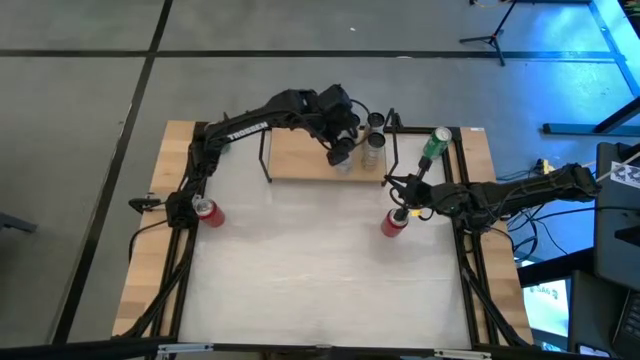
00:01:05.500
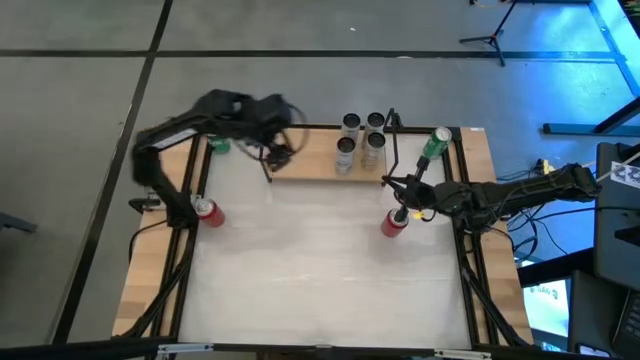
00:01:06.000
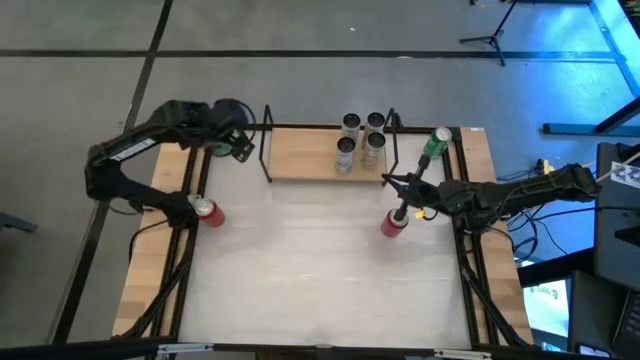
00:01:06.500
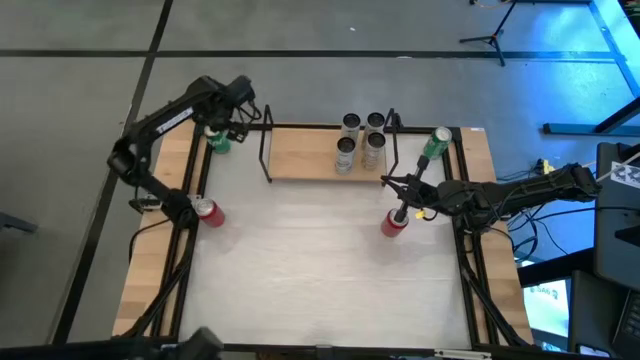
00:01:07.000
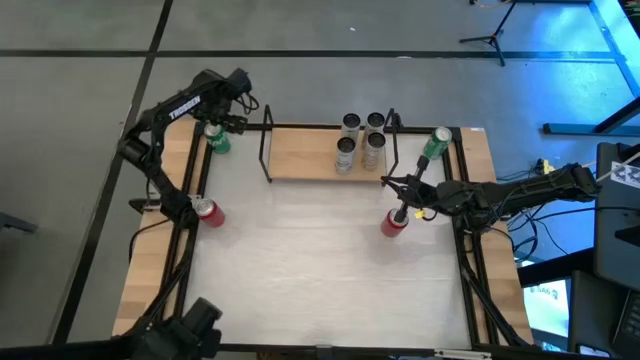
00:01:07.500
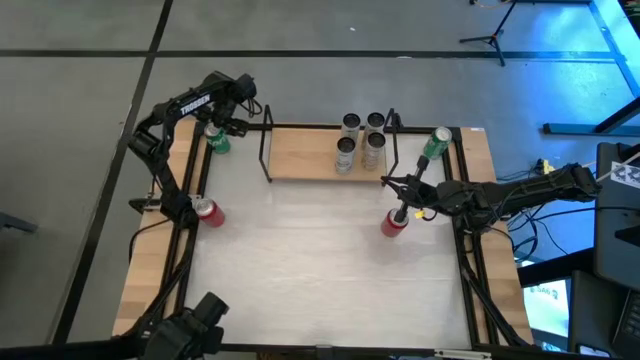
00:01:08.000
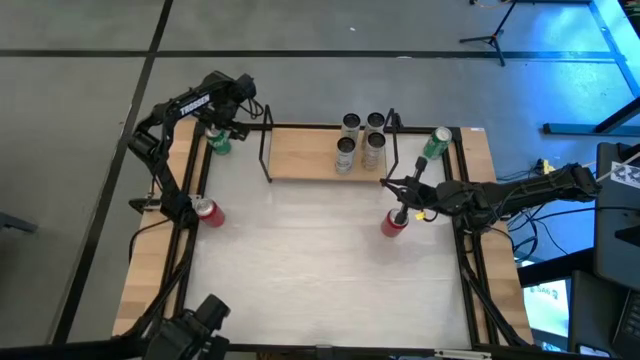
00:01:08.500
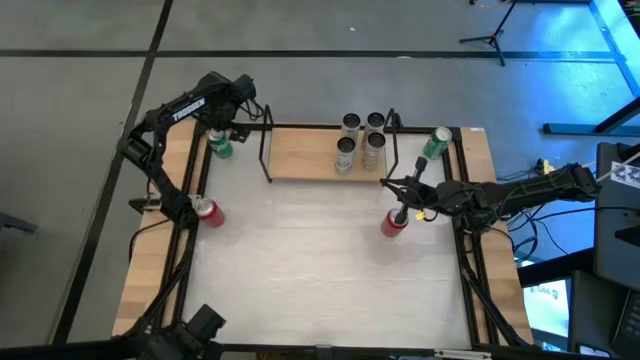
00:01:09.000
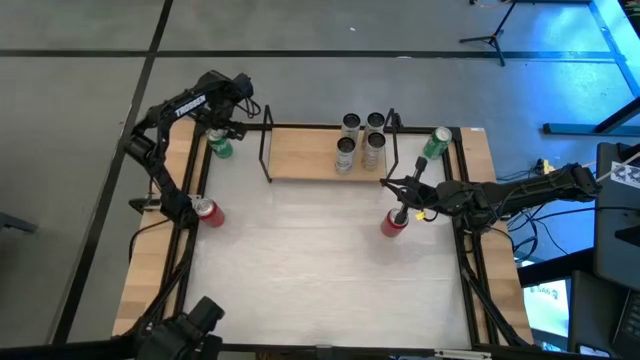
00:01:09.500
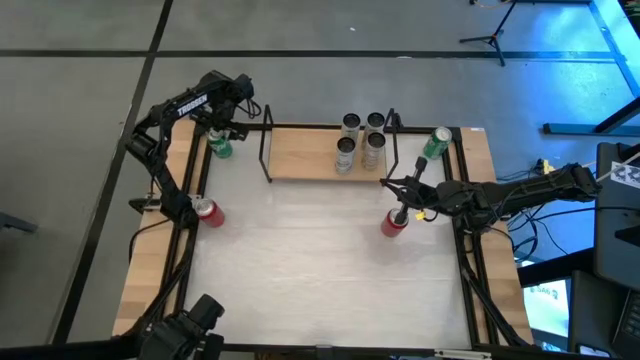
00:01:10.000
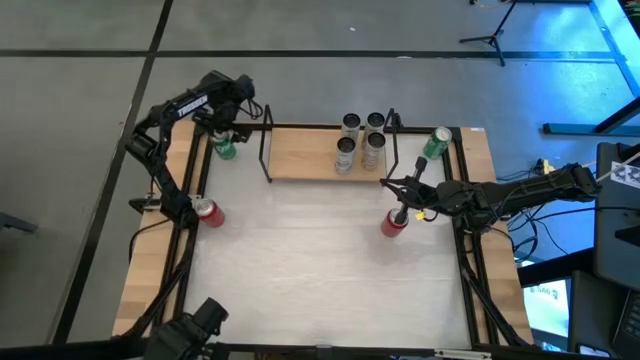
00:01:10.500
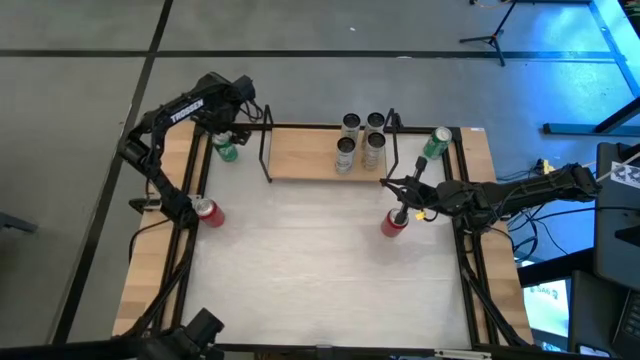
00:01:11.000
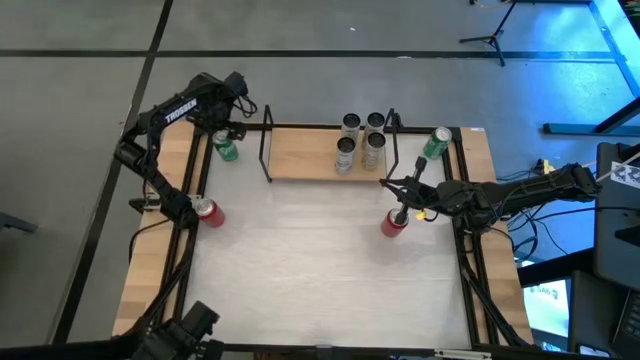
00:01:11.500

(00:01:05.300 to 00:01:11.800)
Task: Place canned beverage on shelf
Put the left green soda can on the shelf

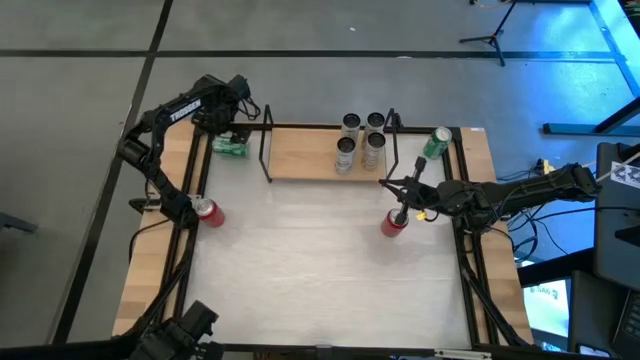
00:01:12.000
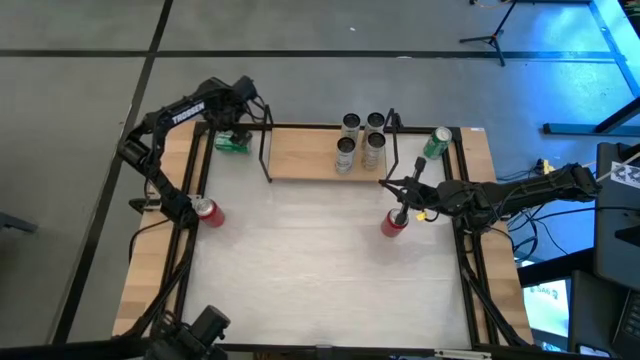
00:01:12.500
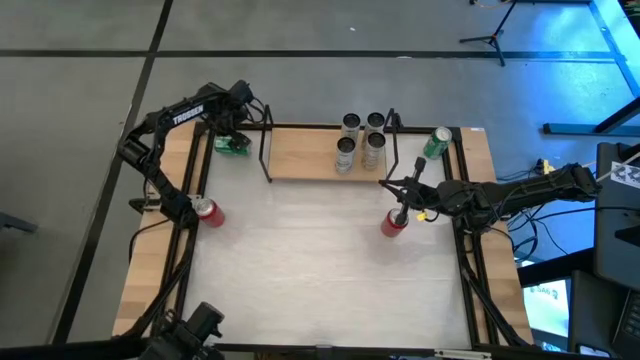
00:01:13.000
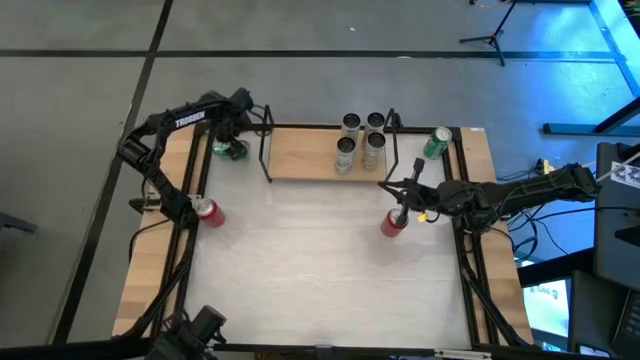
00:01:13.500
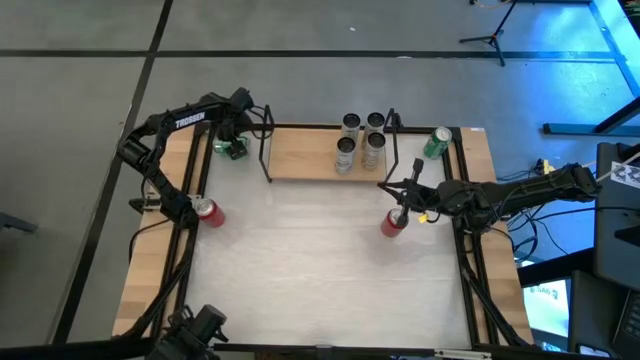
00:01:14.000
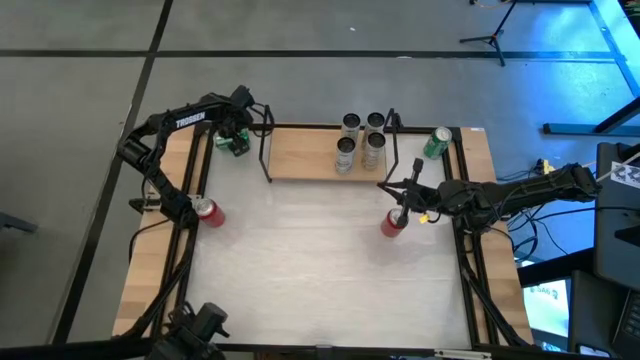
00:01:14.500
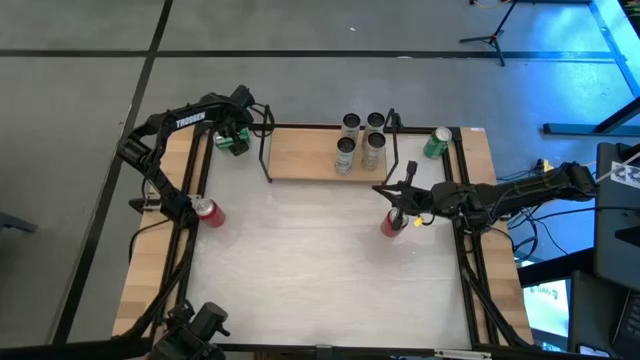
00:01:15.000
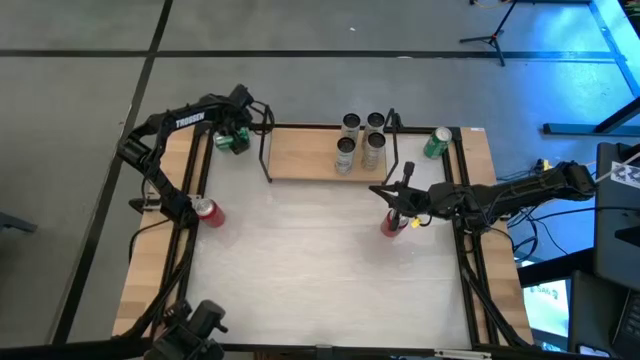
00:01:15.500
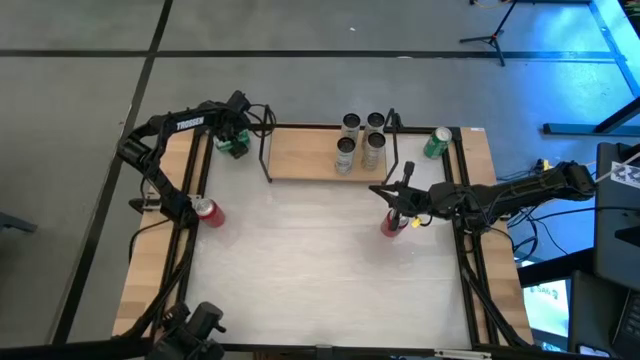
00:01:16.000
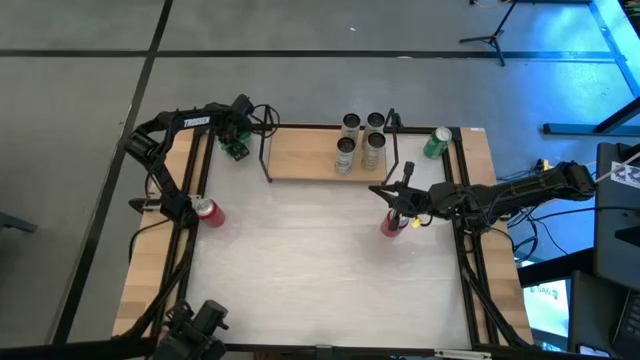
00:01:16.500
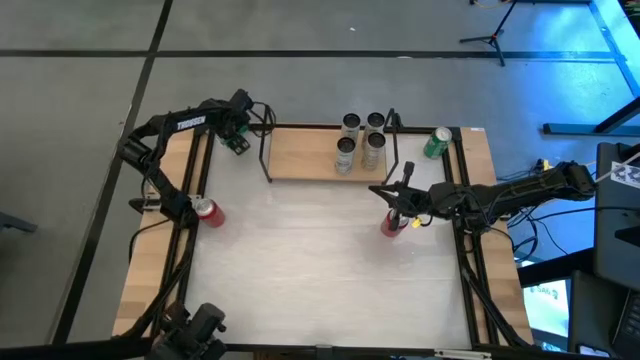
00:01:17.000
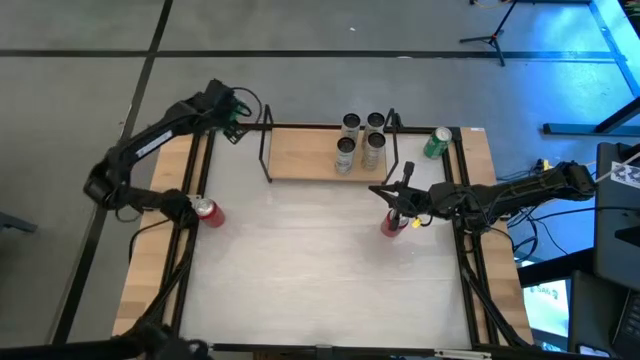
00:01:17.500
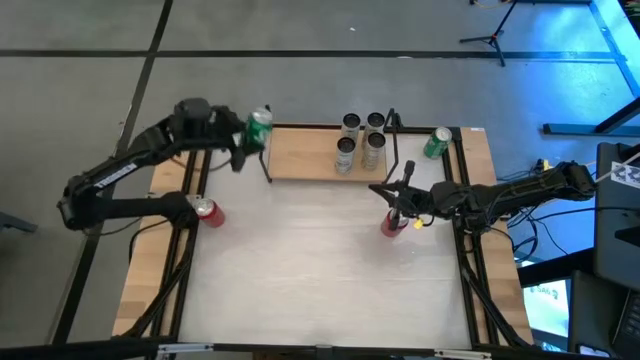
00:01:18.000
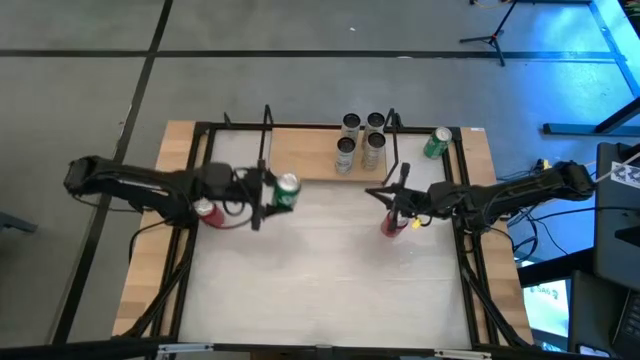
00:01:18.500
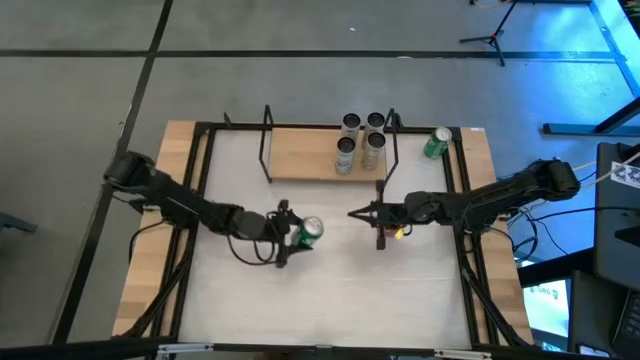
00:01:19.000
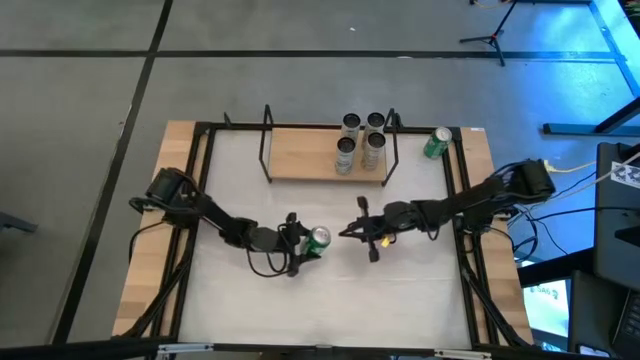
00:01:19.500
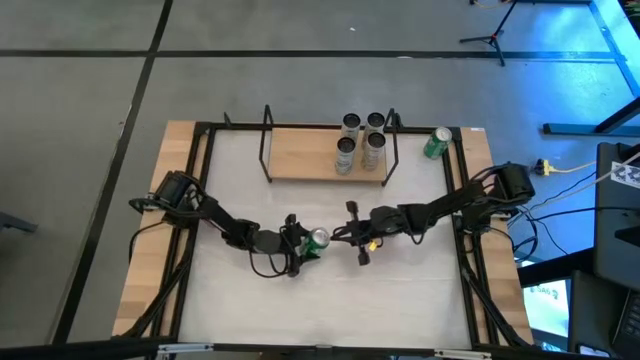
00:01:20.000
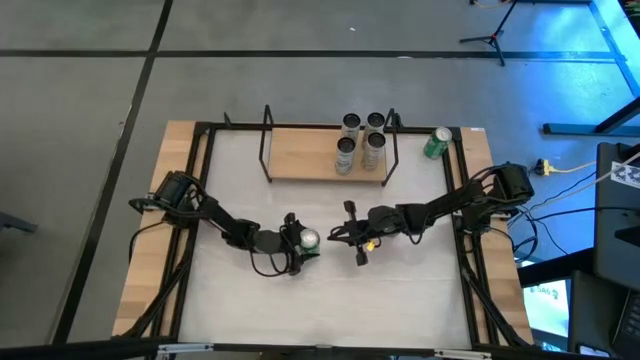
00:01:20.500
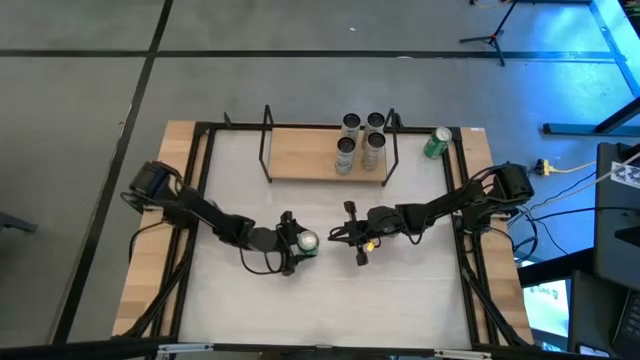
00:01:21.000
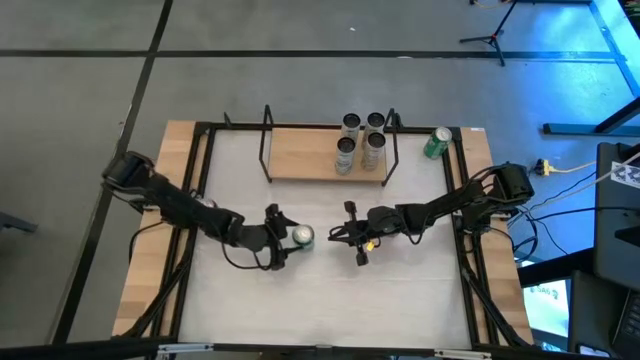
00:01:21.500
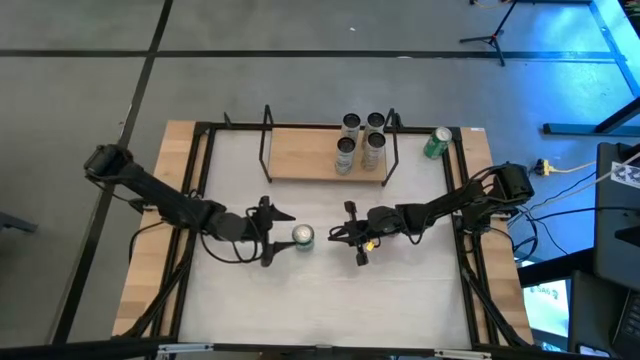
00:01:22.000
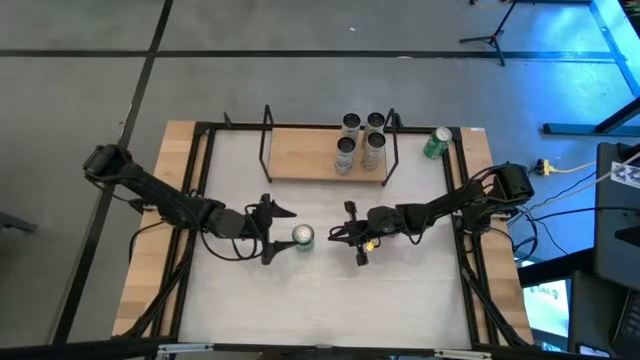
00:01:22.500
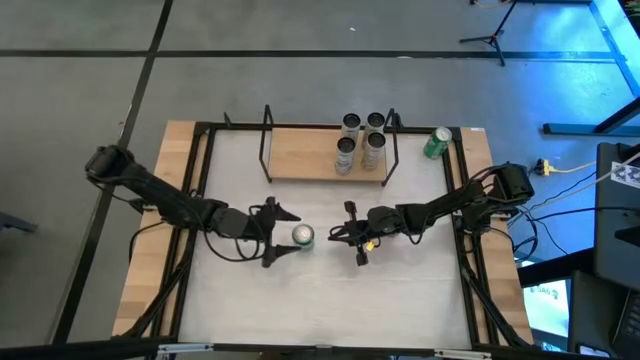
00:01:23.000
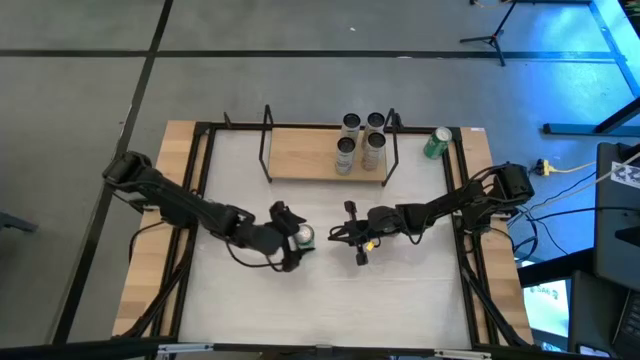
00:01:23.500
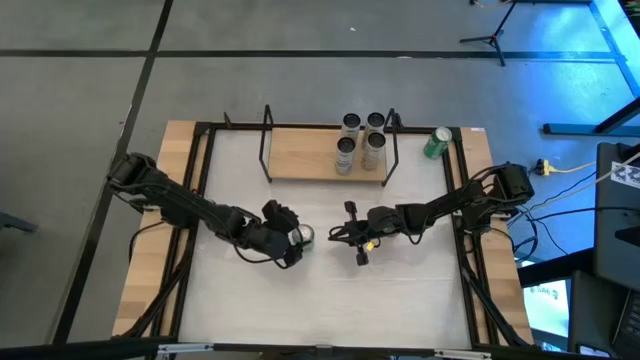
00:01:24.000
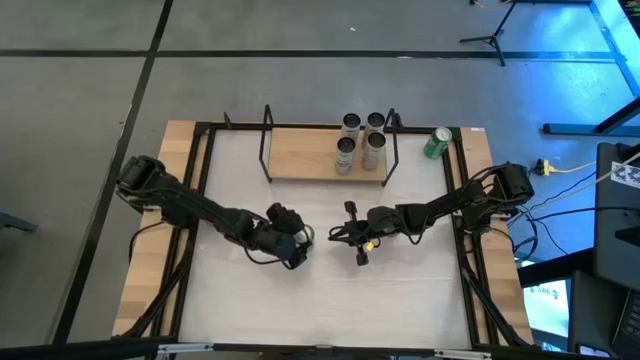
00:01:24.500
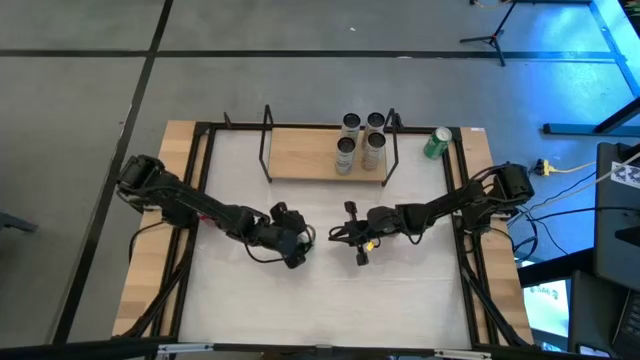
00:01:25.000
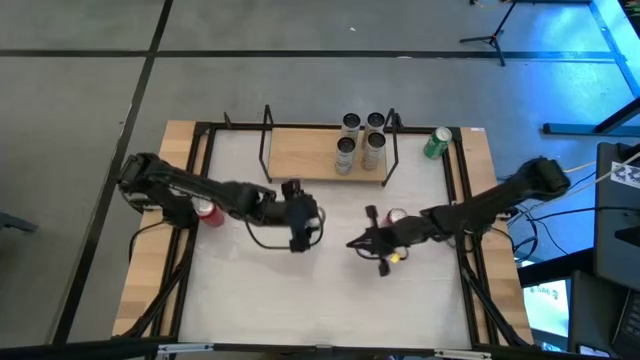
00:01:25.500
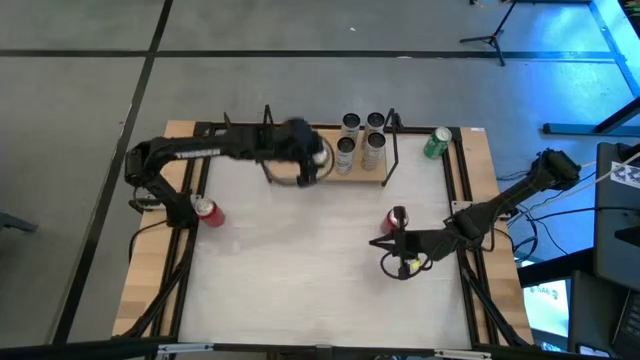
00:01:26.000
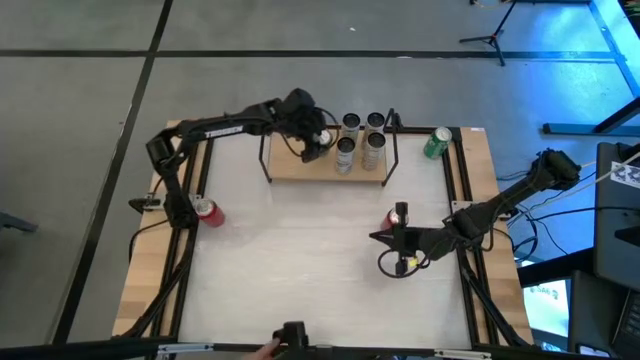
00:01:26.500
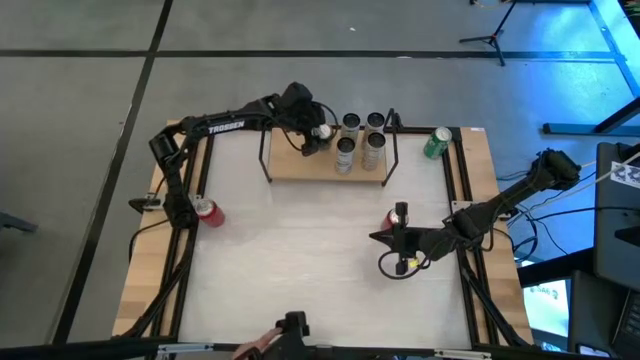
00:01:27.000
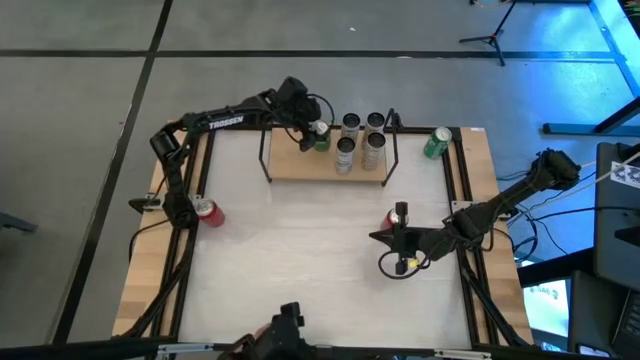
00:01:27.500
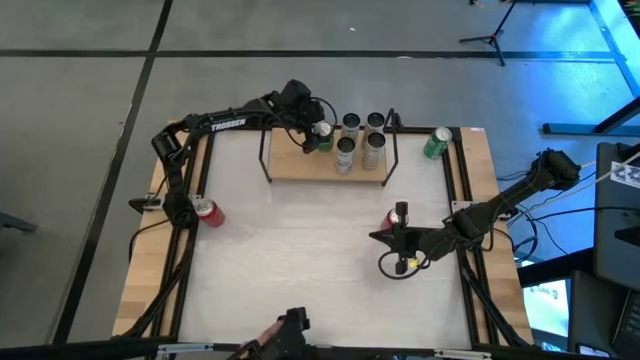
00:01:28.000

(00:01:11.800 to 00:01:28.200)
Put the left green soda can on the shelf
